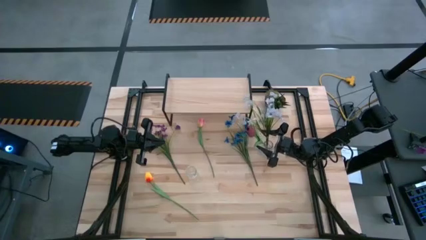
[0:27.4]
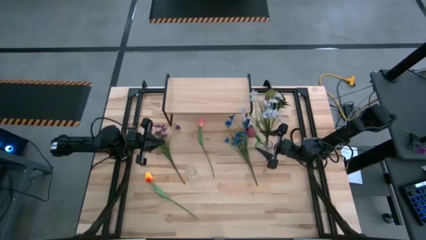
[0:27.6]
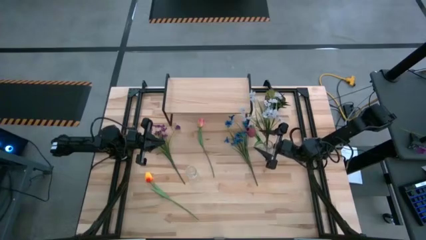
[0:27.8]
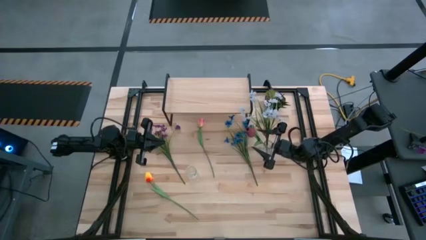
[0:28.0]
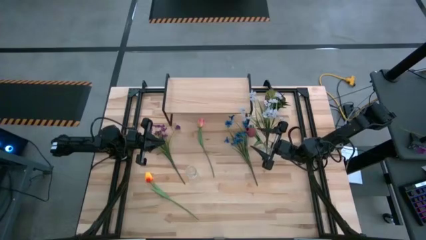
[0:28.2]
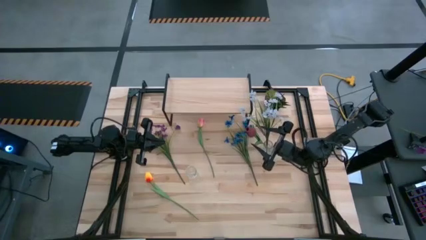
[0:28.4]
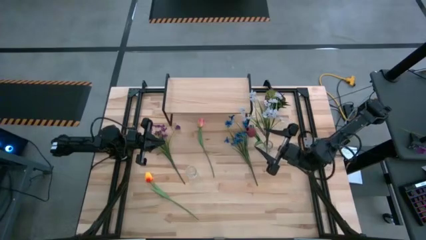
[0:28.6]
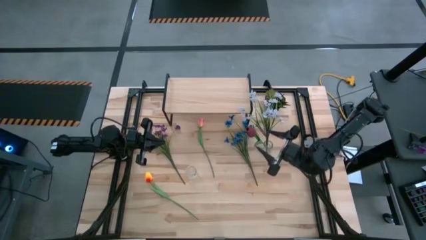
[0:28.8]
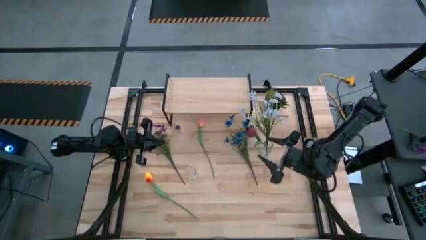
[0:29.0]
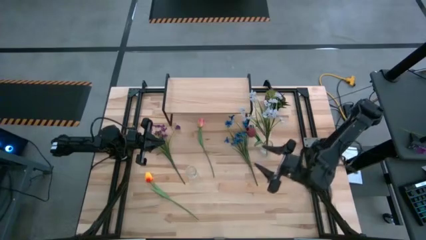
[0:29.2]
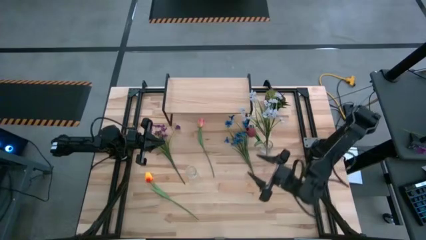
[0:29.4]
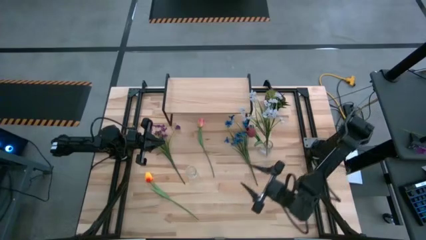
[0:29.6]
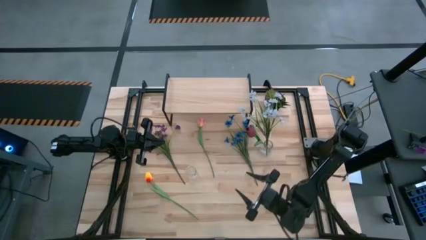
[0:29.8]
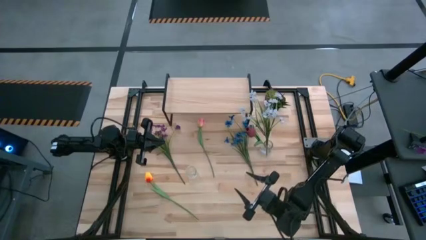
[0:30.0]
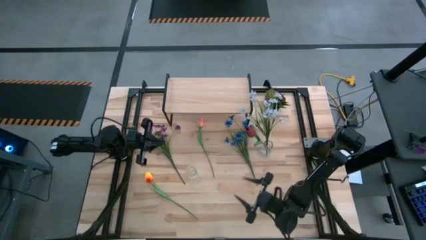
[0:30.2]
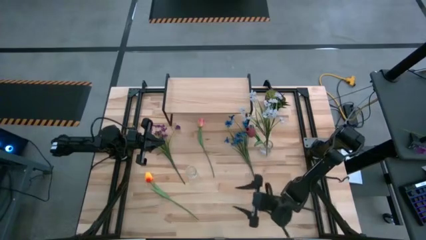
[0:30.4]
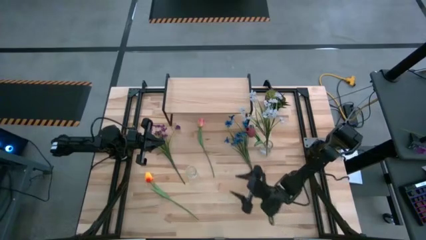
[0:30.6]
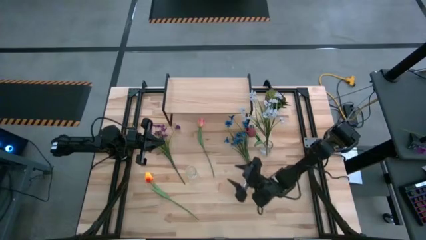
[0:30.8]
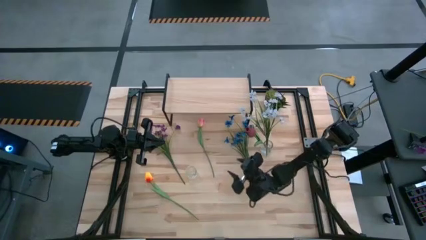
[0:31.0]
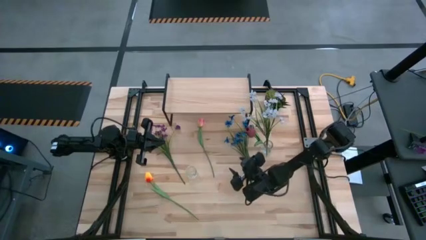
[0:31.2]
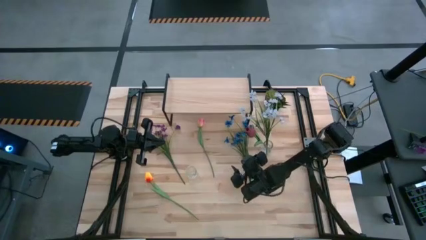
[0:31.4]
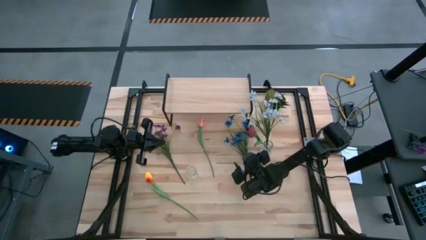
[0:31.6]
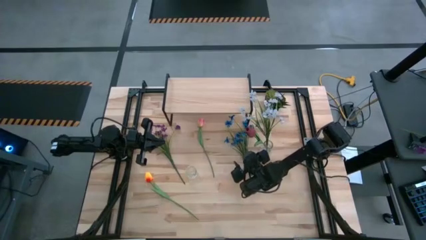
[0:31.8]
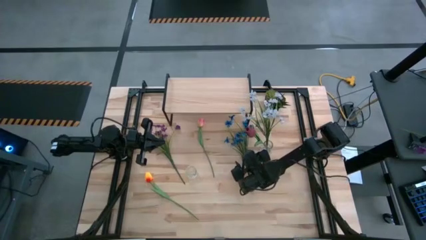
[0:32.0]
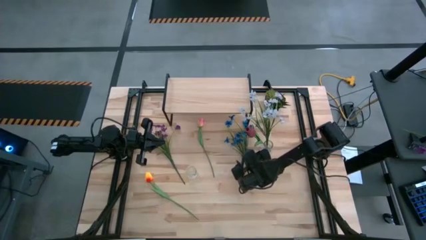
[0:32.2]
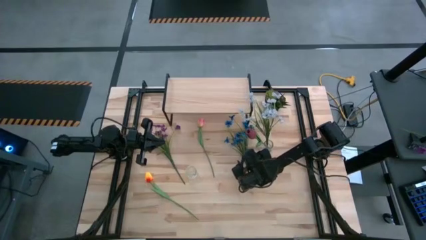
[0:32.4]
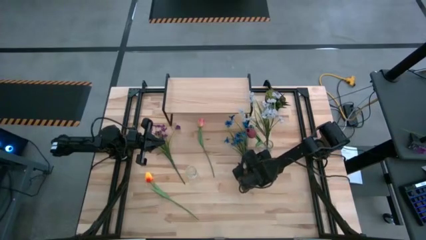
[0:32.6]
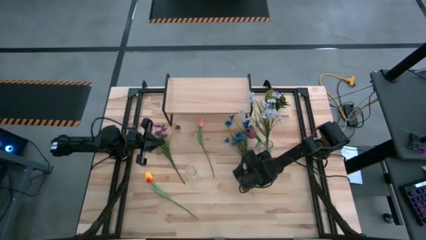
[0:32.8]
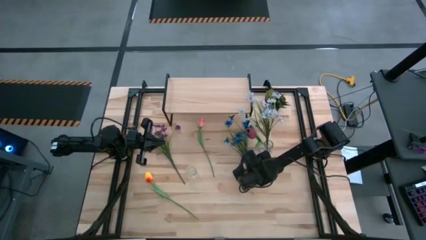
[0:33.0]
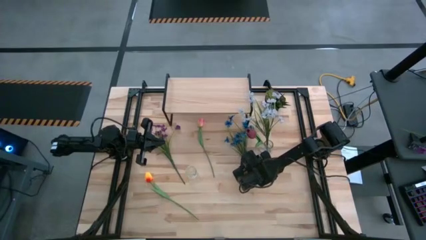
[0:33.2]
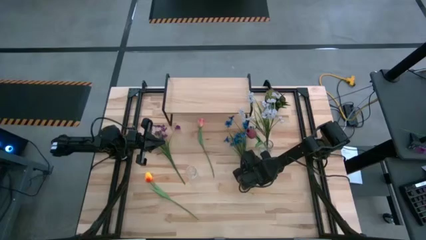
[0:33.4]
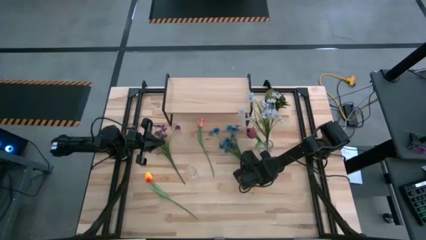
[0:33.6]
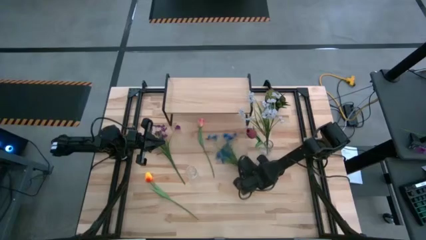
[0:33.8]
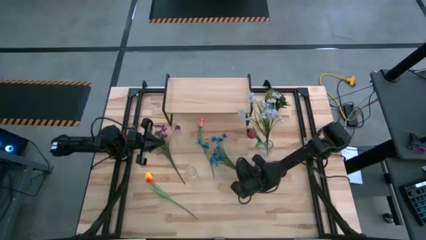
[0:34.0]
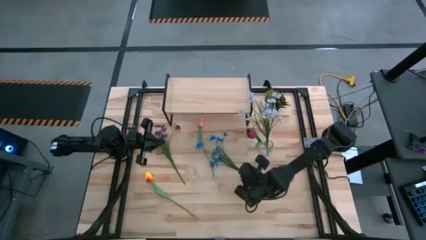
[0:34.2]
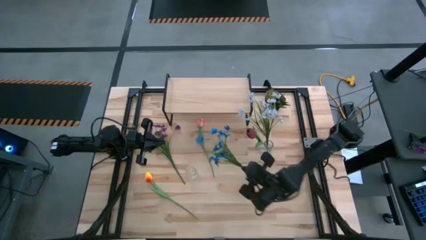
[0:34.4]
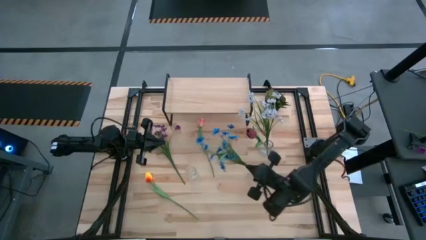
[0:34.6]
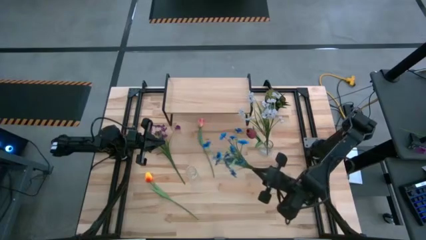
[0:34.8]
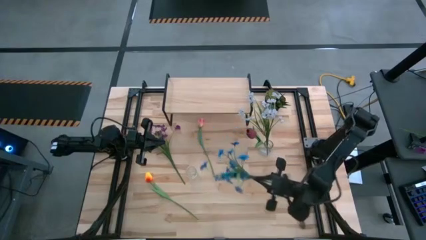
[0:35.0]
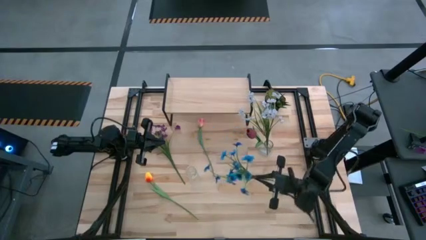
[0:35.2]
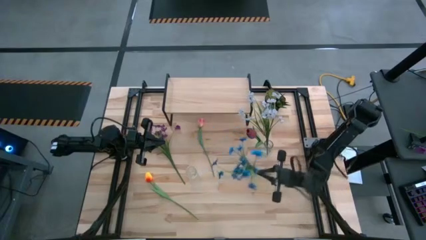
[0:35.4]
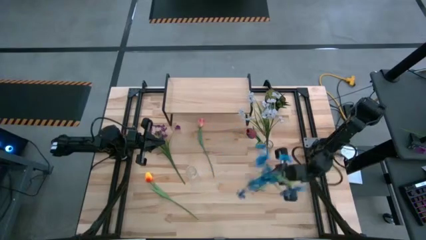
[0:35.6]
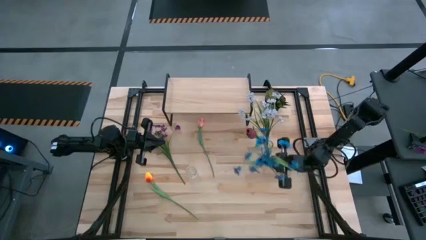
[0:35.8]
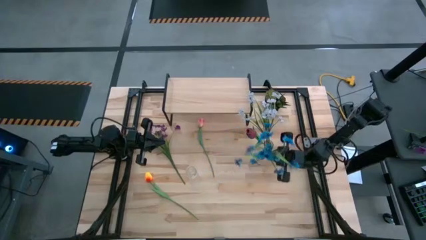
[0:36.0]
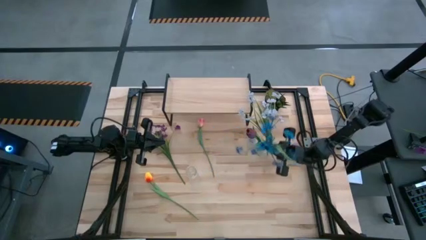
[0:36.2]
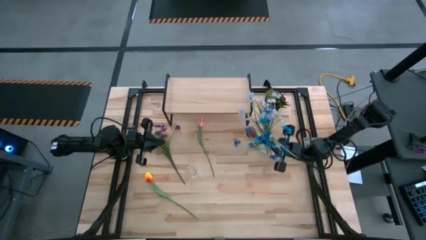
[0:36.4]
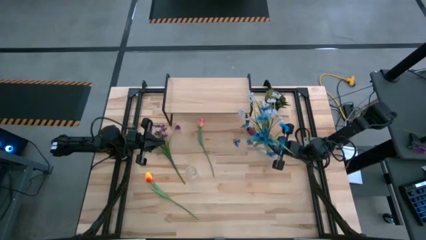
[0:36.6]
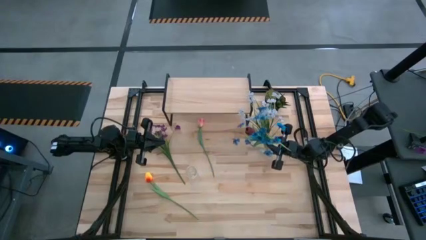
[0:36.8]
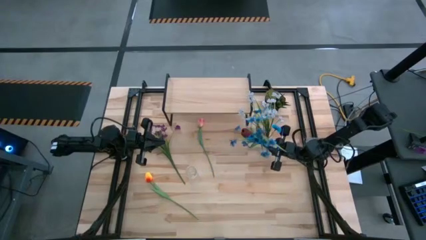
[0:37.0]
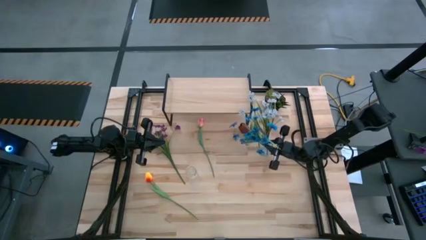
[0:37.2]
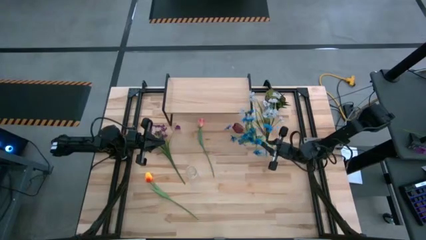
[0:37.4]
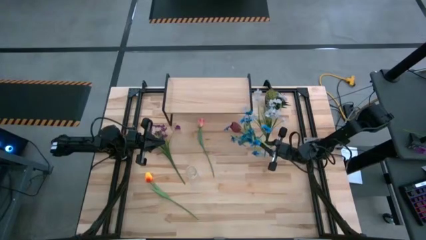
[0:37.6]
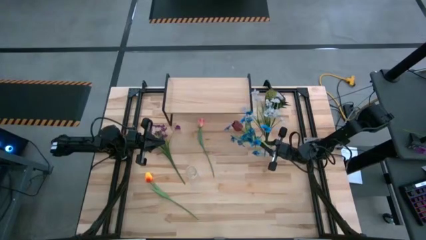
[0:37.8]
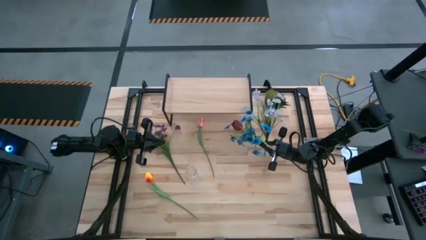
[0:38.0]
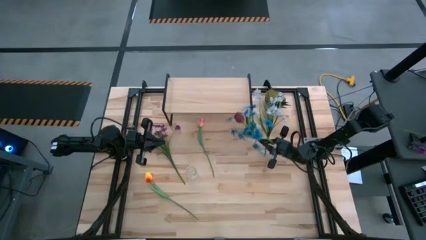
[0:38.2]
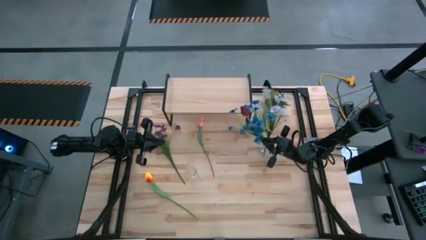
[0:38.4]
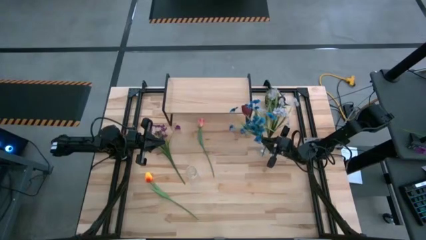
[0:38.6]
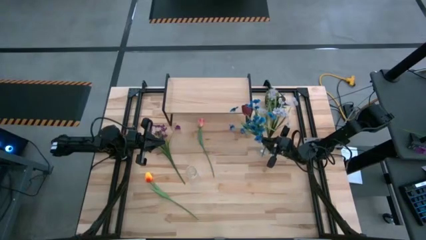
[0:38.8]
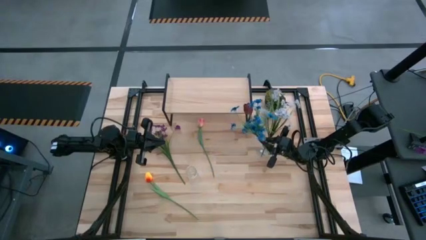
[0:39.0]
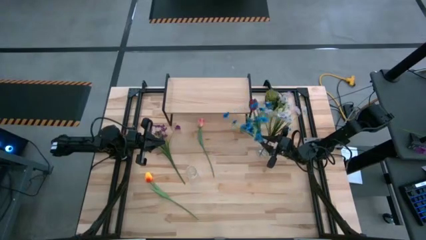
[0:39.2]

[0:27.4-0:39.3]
Task: Pick and place flowers into a vace then onto a shelf
Put the blue flowers into the right crystal vase
